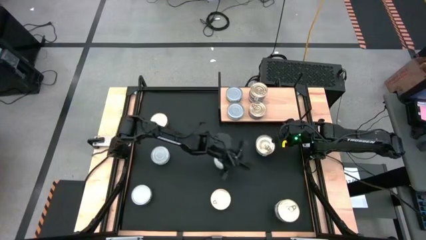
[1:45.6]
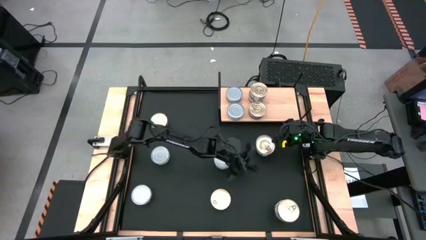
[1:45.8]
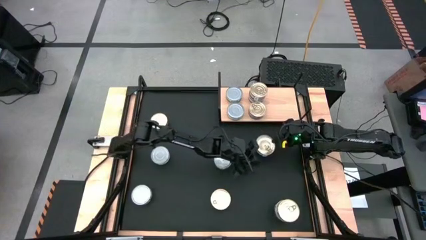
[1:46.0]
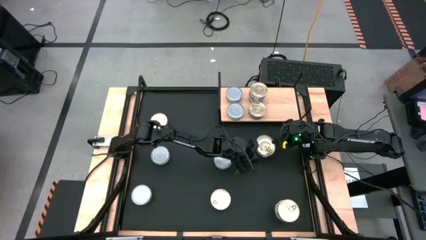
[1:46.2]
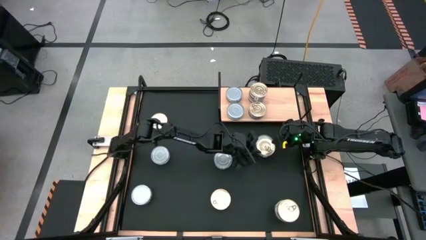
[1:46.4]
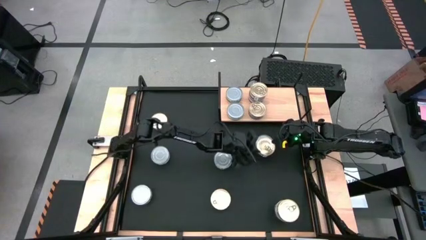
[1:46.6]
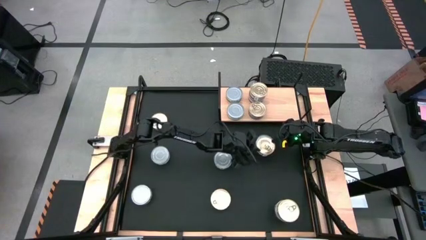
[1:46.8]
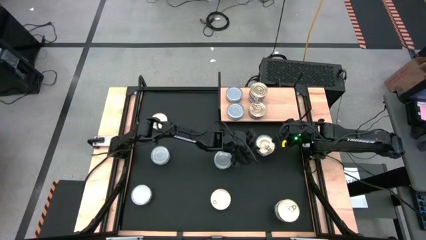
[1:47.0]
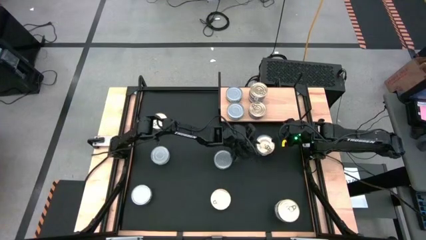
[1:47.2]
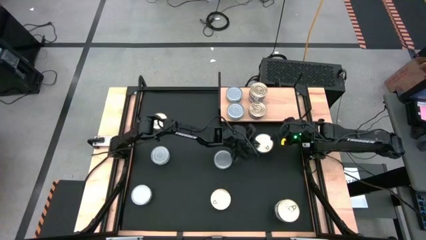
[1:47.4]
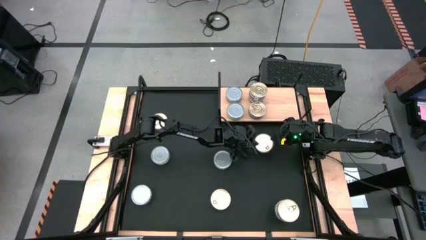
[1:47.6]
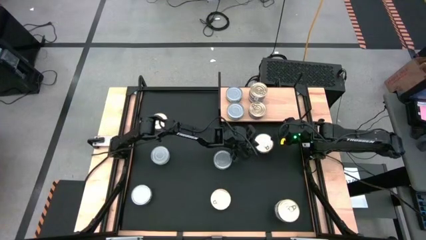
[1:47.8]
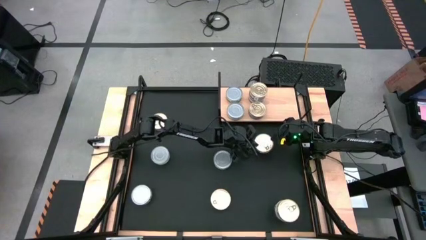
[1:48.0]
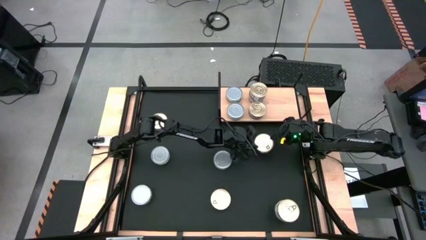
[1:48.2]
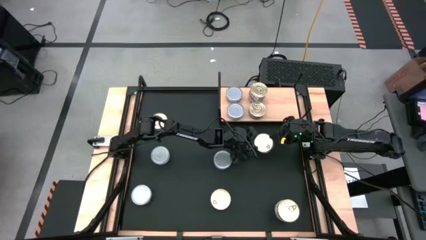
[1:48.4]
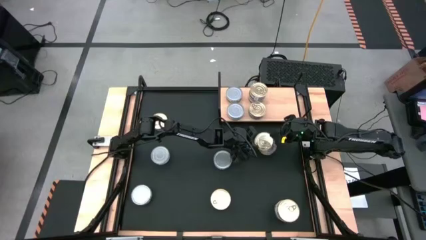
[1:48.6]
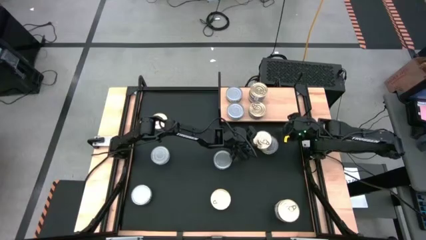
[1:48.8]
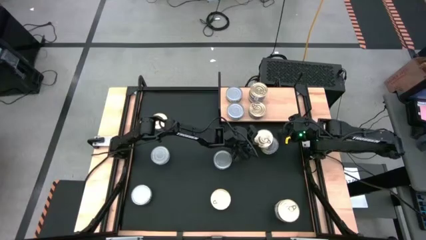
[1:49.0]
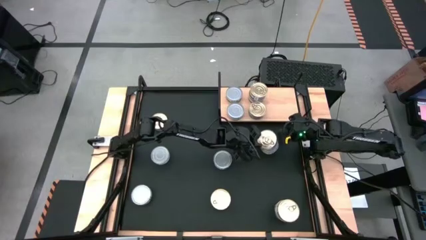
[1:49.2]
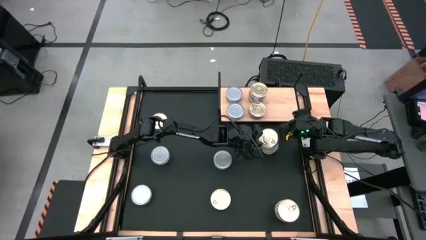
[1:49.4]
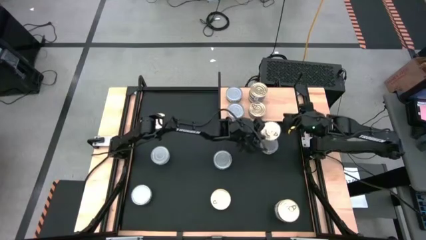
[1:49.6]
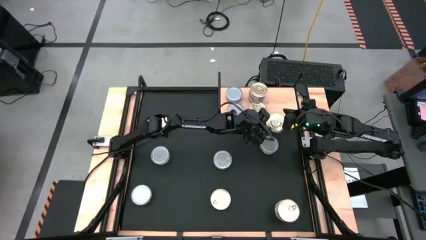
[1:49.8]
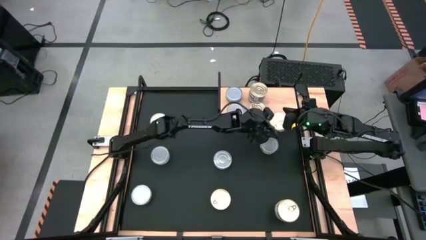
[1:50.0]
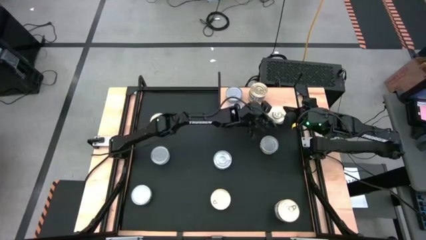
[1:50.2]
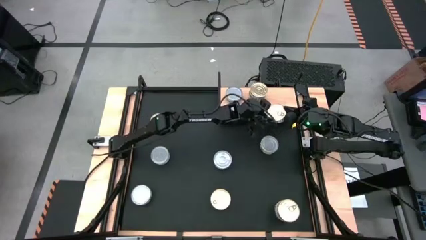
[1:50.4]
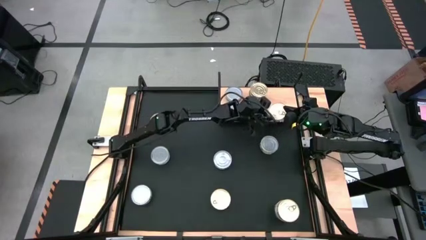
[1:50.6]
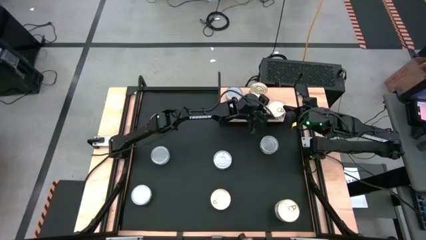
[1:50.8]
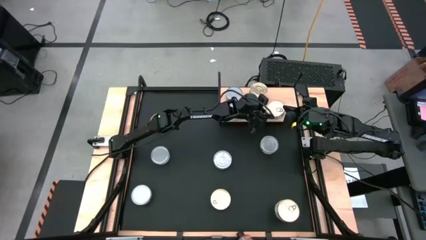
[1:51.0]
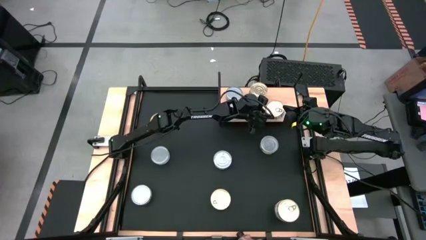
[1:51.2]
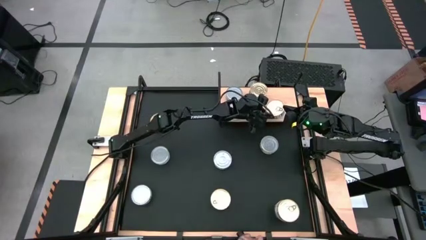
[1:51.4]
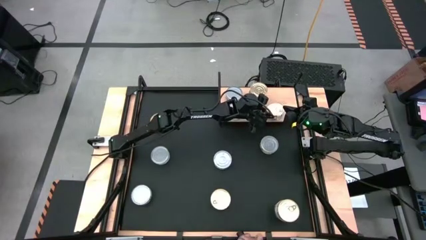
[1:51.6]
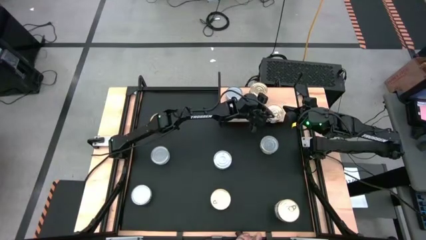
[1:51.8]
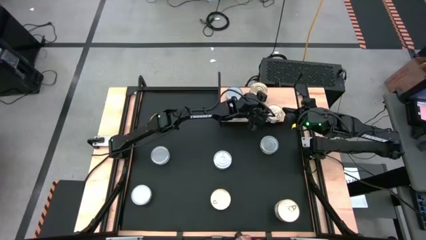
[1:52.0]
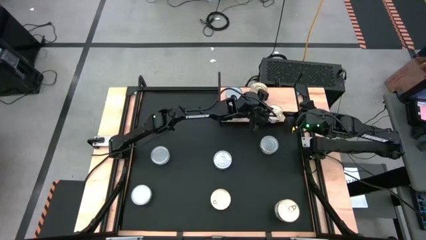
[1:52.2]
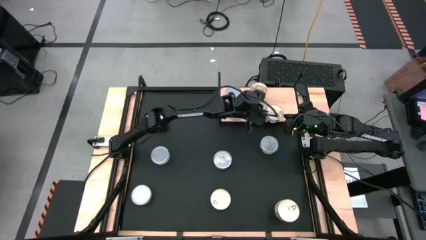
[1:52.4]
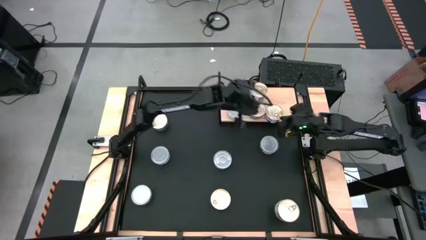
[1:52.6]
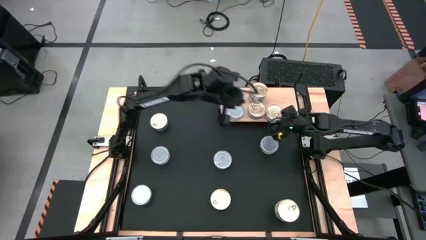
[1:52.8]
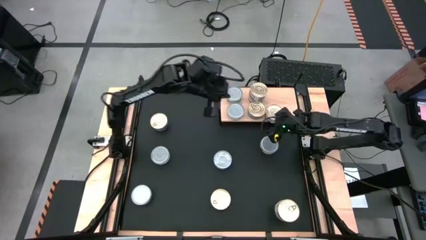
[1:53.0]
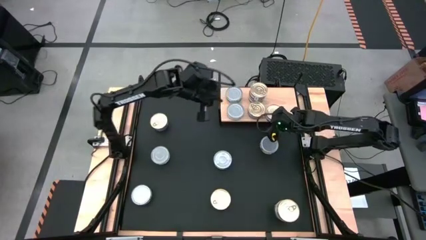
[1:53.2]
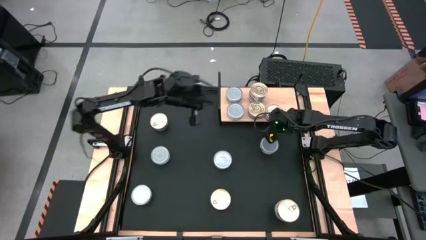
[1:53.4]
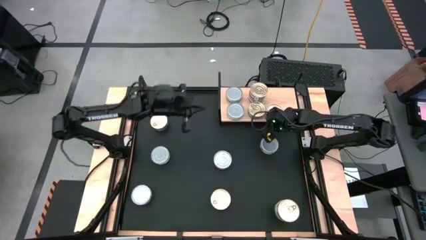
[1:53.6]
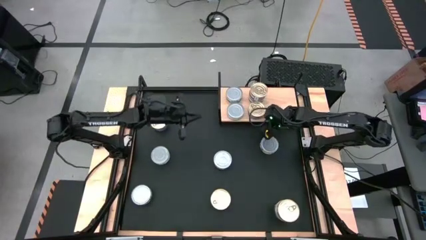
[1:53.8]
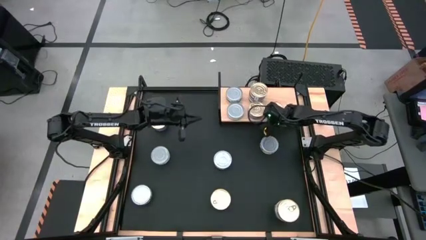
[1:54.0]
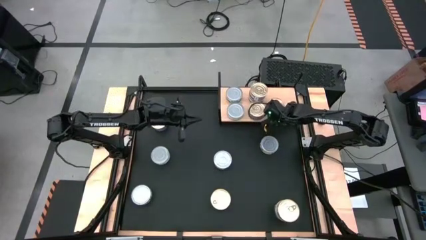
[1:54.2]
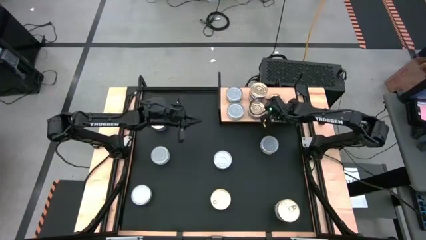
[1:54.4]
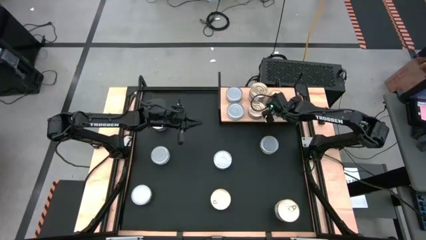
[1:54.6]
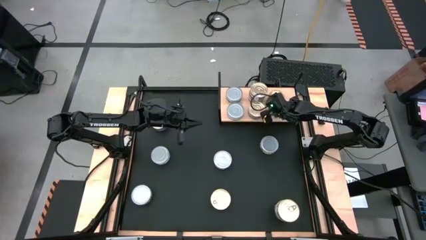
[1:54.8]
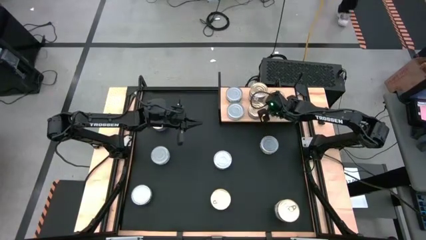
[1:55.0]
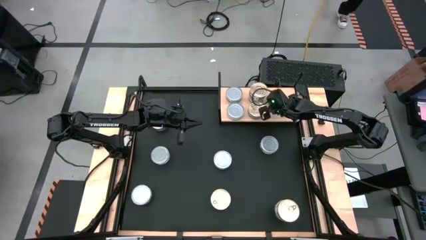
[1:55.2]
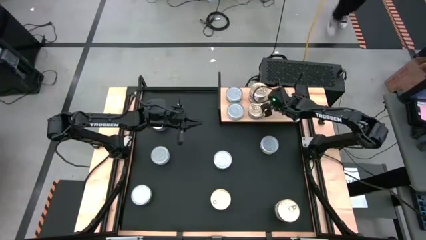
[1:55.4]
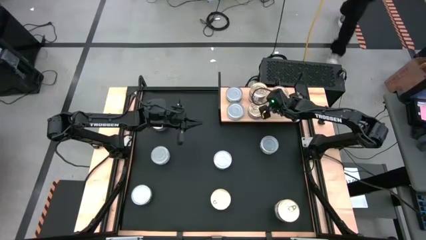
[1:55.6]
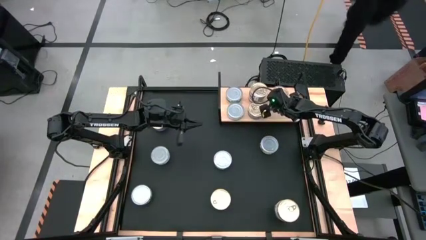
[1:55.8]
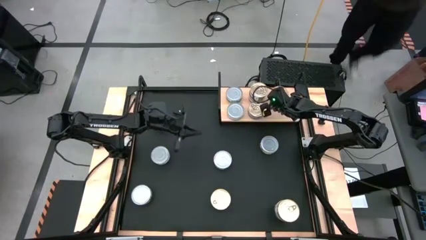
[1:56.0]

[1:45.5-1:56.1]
Task: Stack canned seafood by type on shelf
Put the blue pink tuna can on the shelf

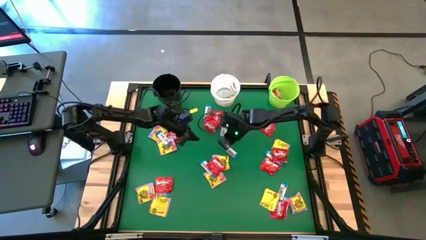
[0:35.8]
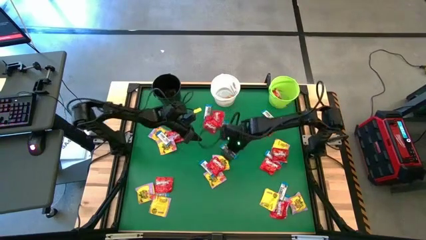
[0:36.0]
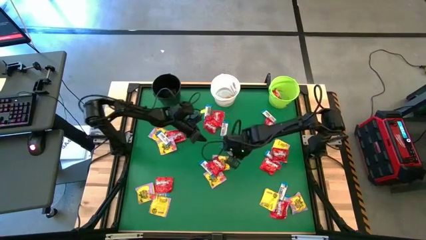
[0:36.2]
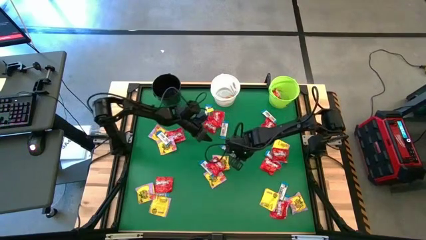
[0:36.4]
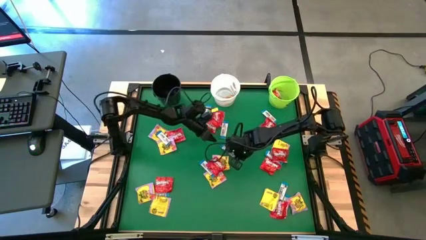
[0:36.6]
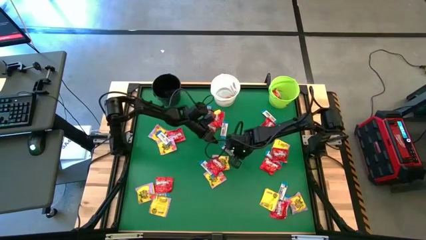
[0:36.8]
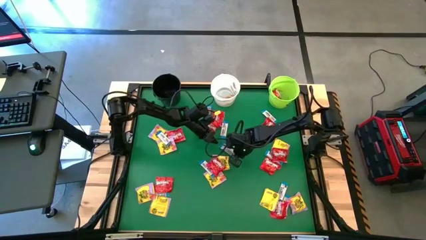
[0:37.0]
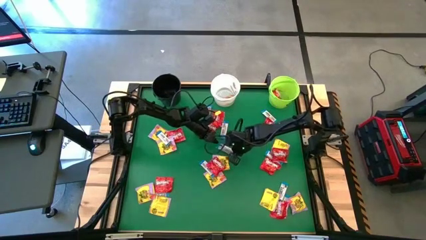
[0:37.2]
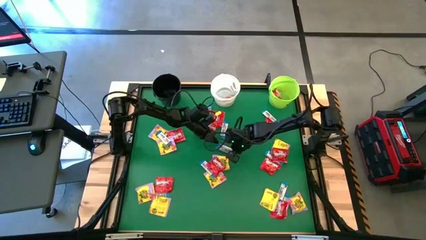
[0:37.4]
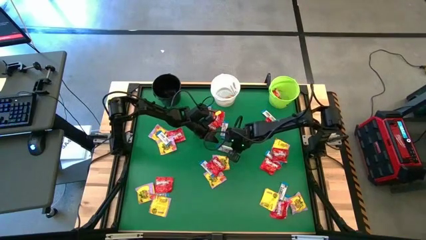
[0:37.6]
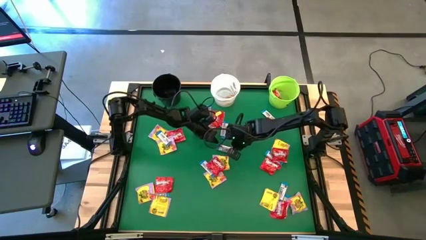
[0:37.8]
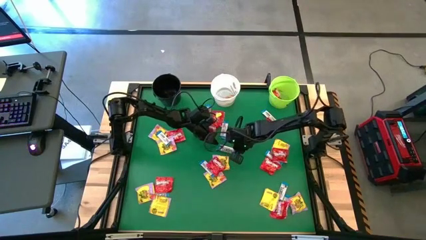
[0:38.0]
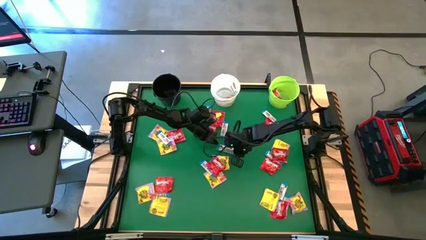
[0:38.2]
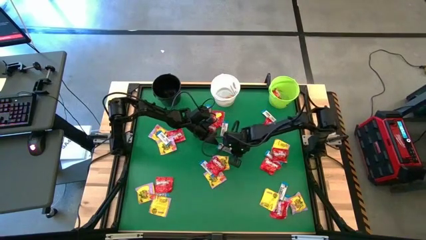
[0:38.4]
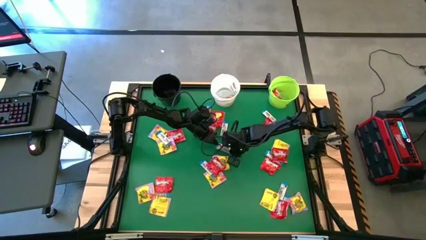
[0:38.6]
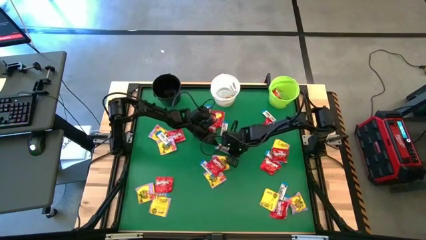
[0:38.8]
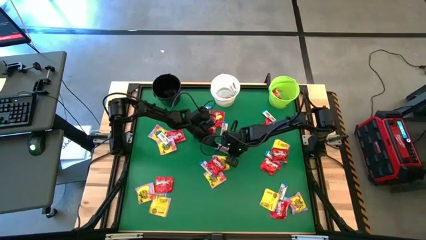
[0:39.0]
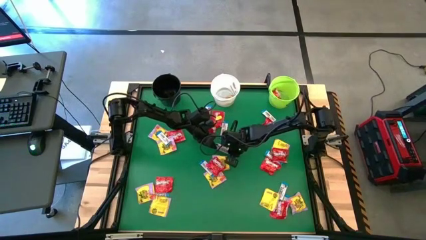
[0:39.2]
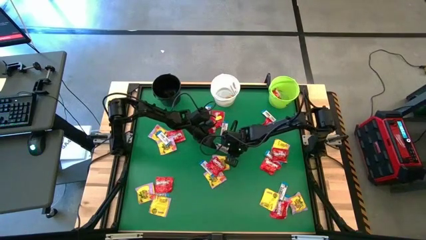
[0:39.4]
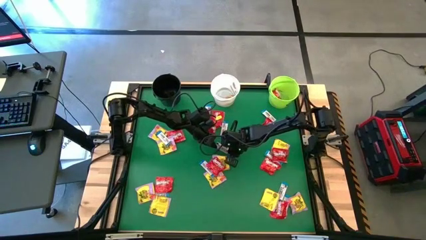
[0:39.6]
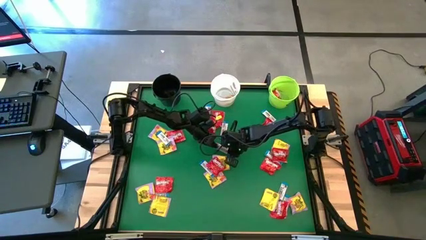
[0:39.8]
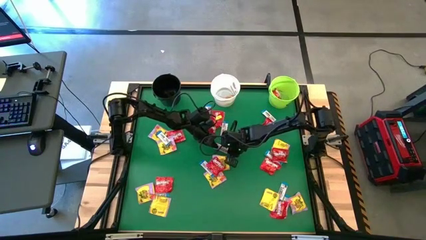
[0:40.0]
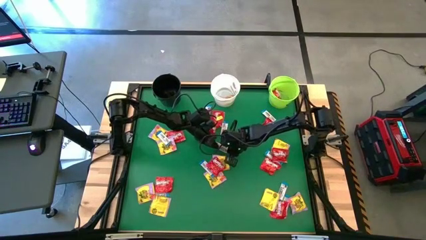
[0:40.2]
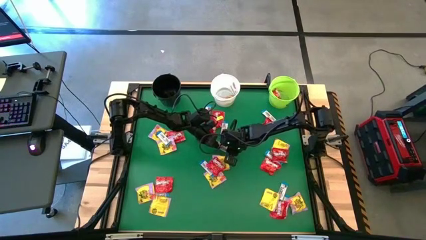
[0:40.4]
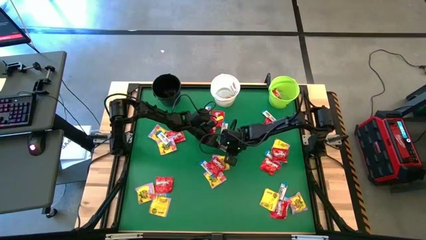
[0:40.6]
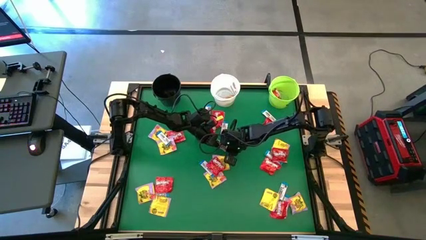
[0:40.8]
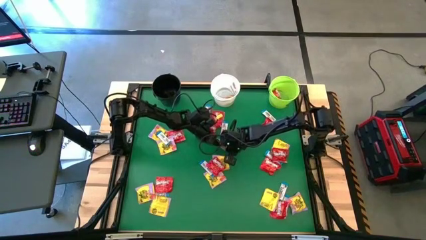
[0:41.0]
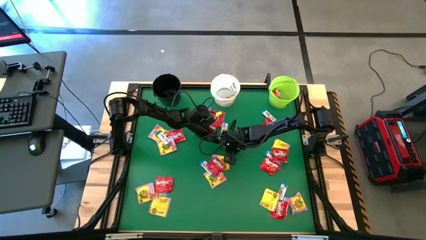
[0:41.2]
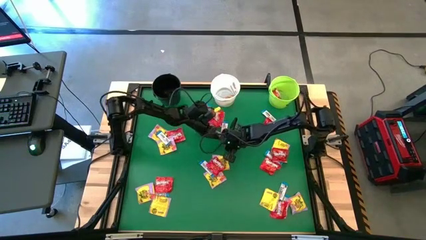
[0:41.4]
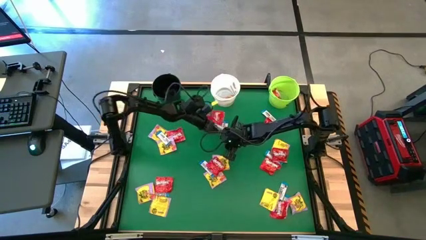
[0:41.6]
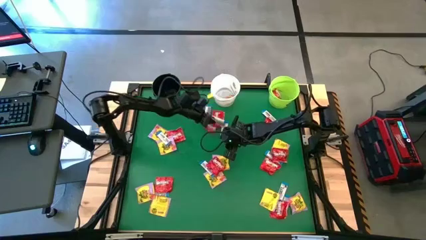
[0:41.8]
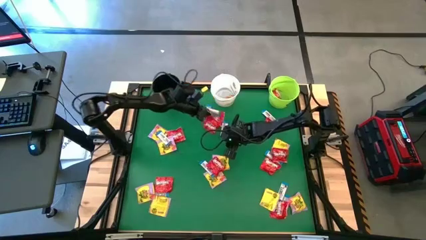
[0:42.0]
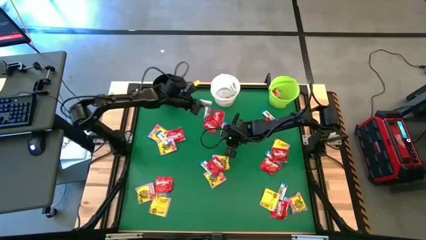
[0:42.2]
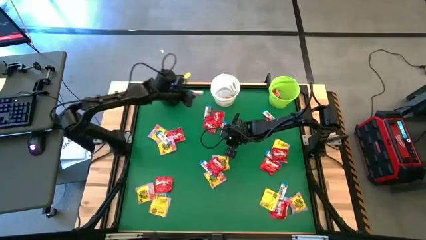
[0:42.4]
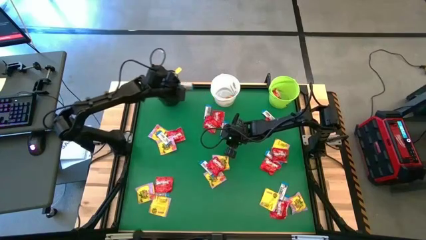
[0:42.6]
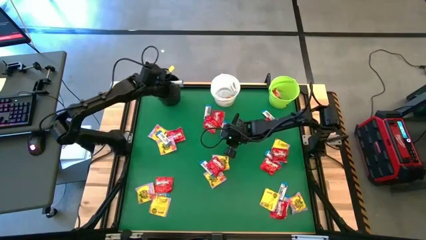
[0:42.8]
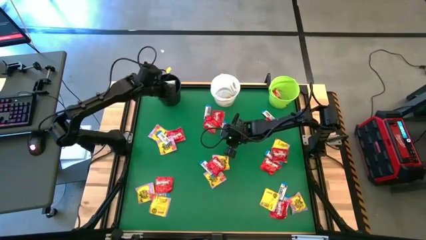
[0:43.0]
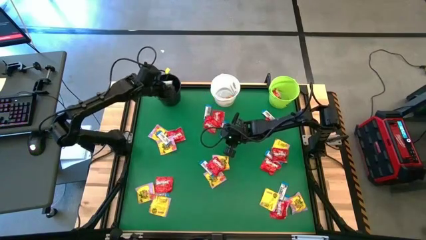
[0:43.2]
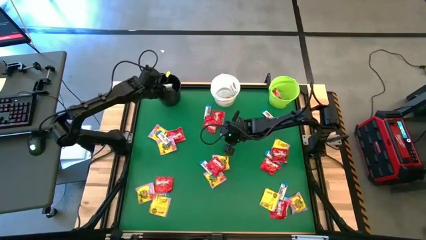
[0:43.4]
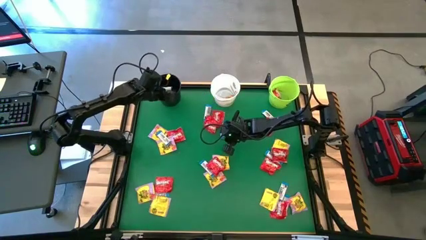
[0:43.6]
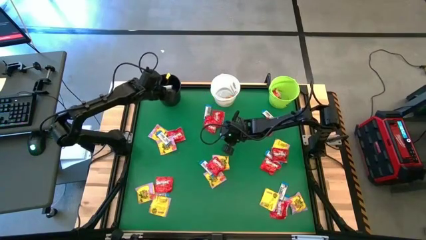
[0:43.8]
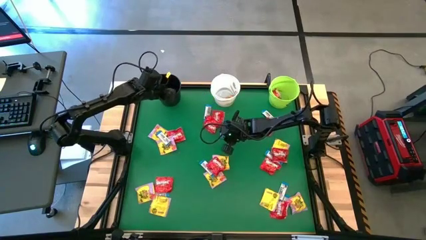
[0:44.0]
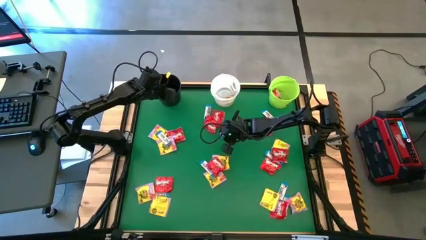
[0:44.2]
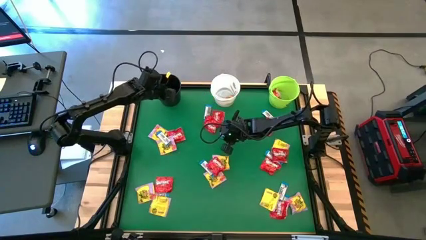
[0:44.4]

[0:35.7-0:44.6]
Task: Sort candy by brand, put in halloween buckets
Put the white candy into the black bucket
